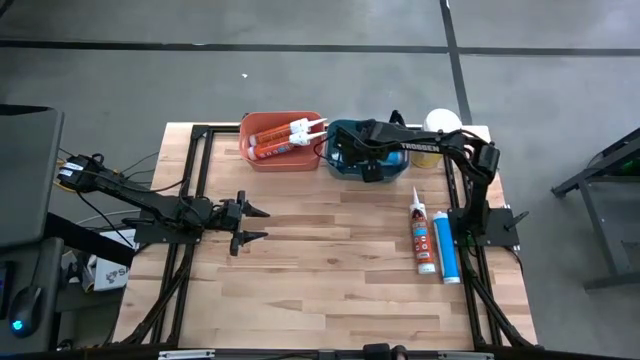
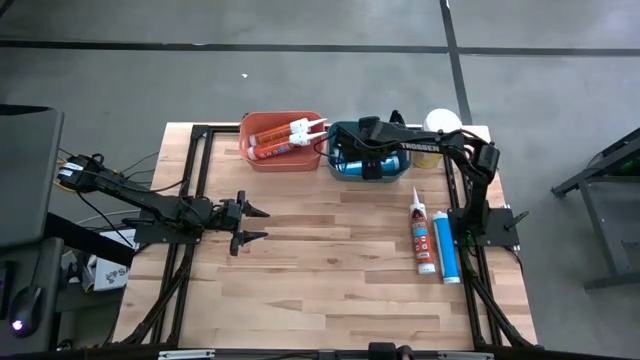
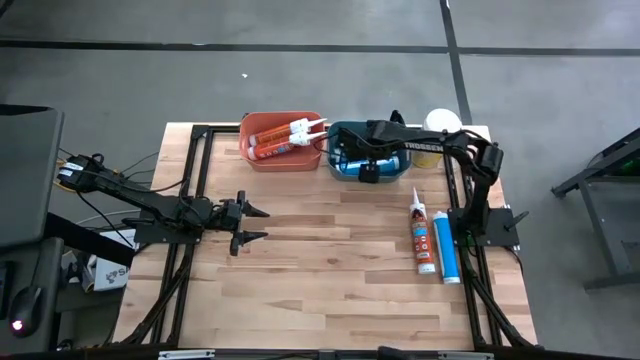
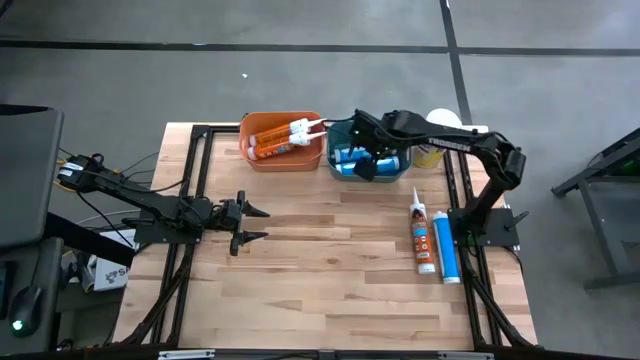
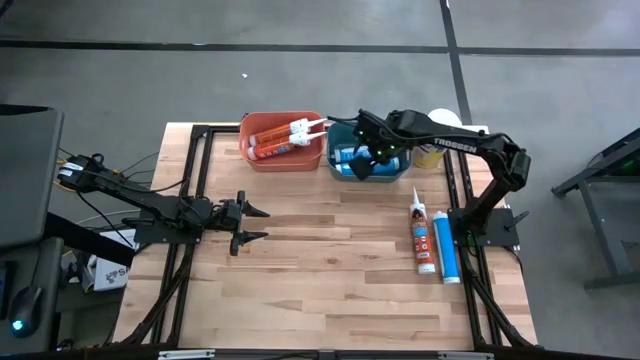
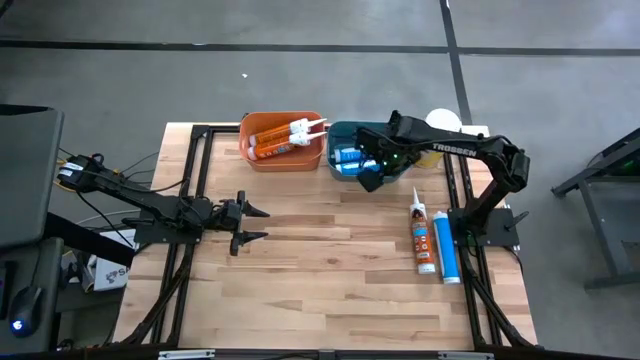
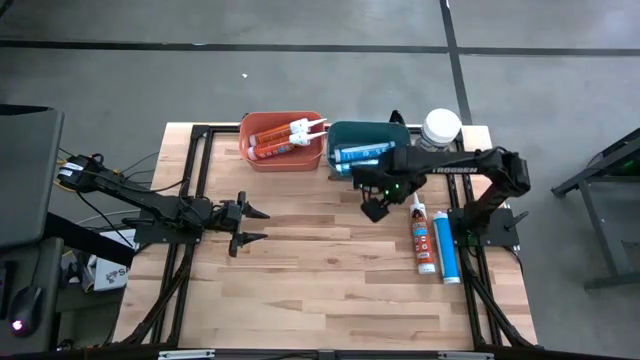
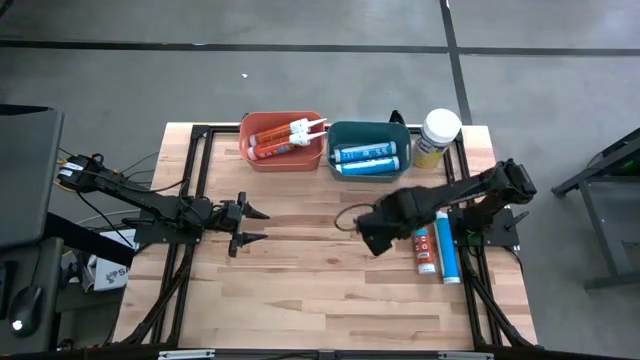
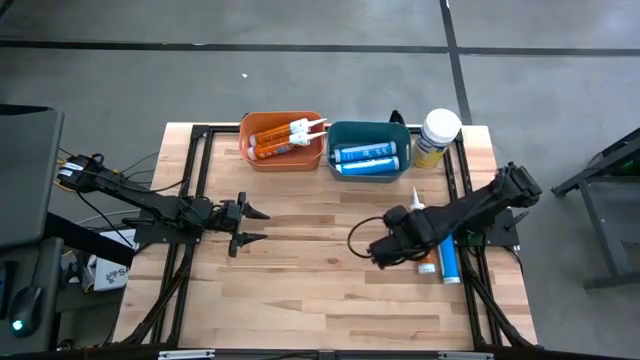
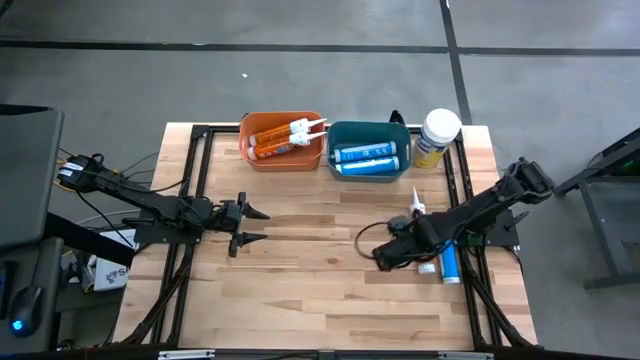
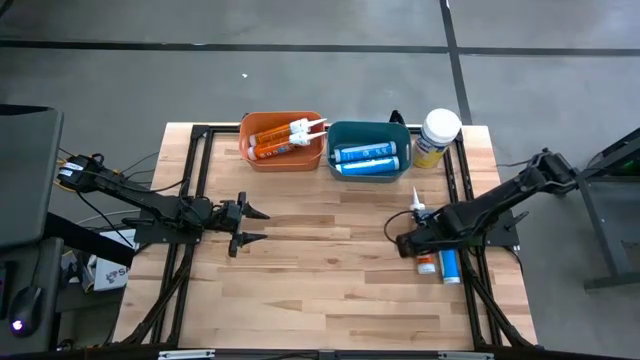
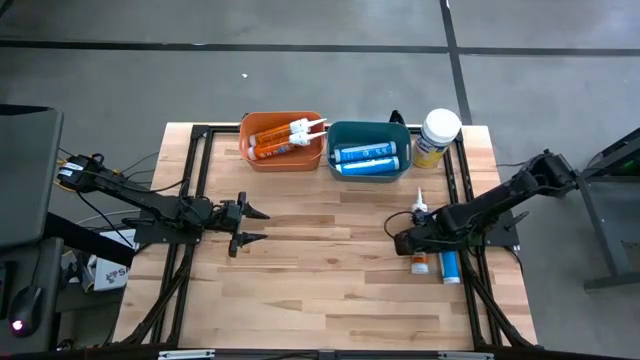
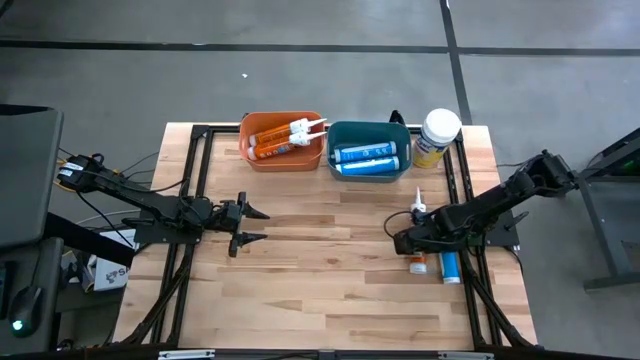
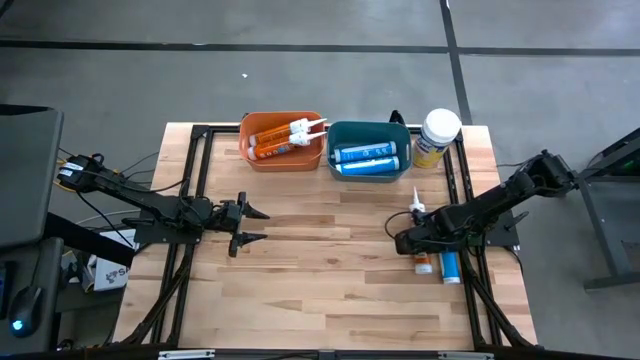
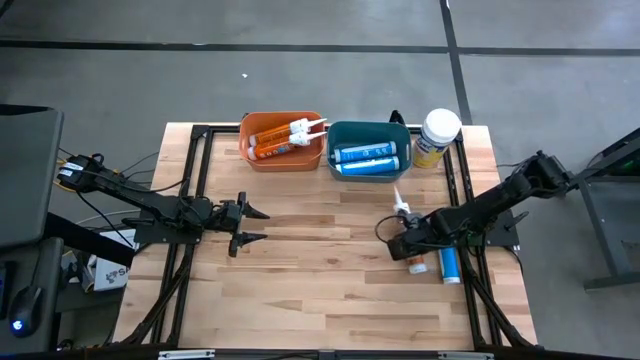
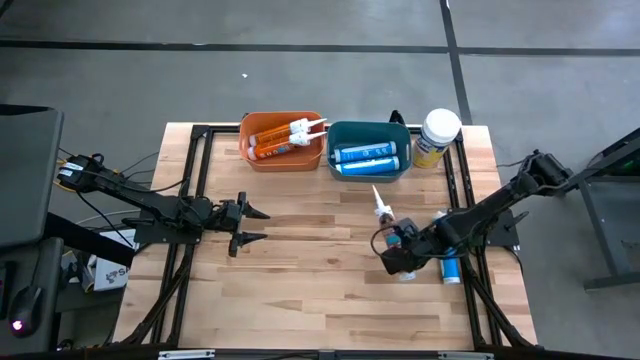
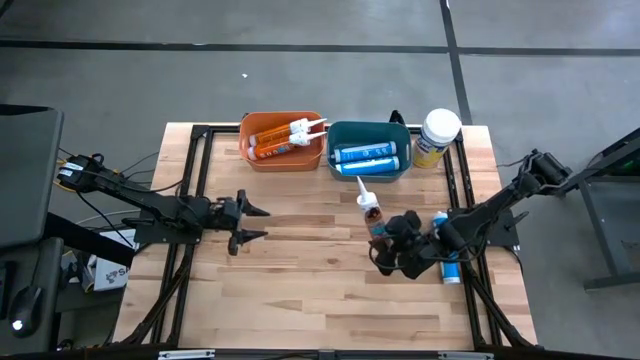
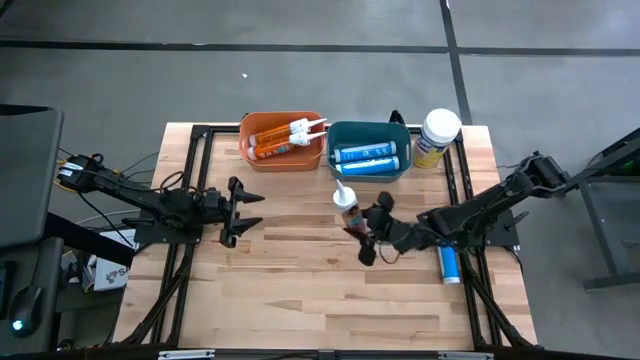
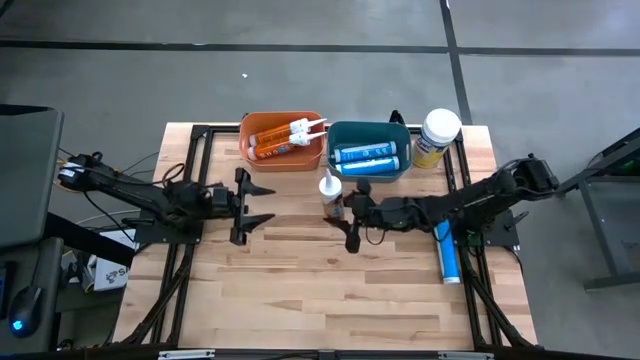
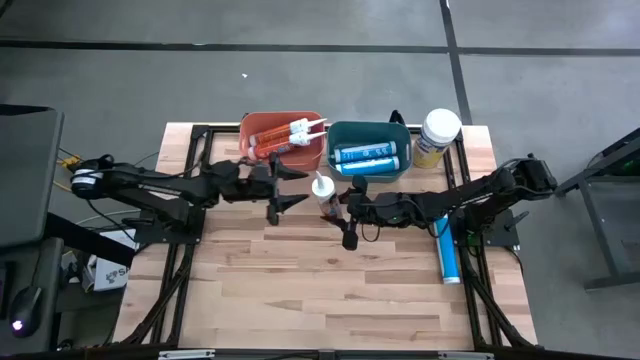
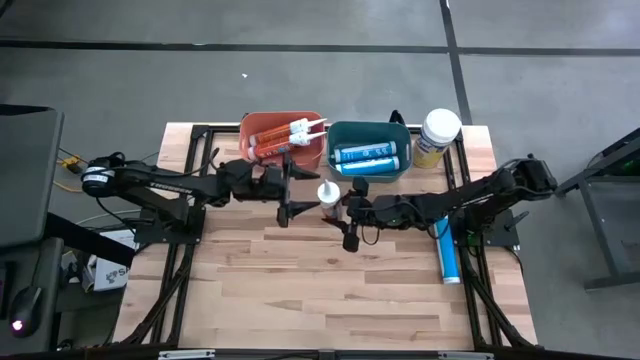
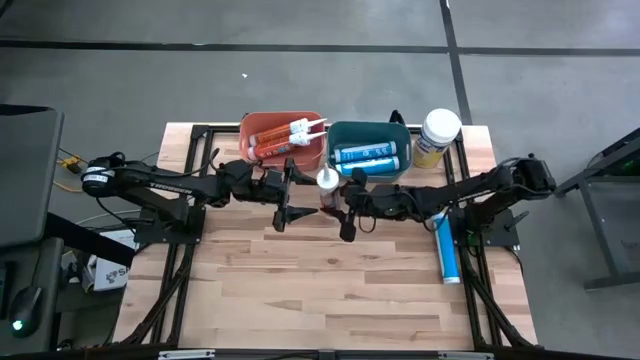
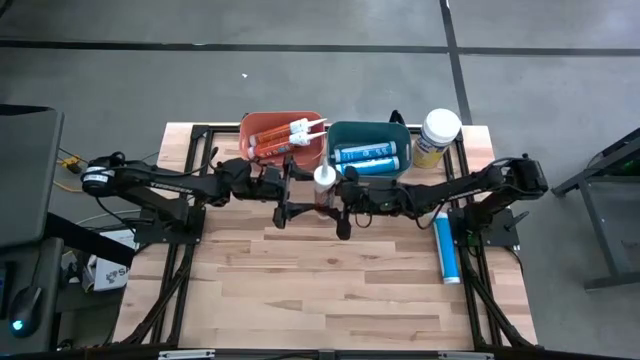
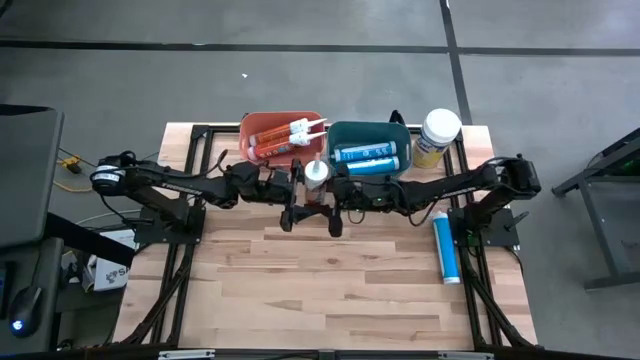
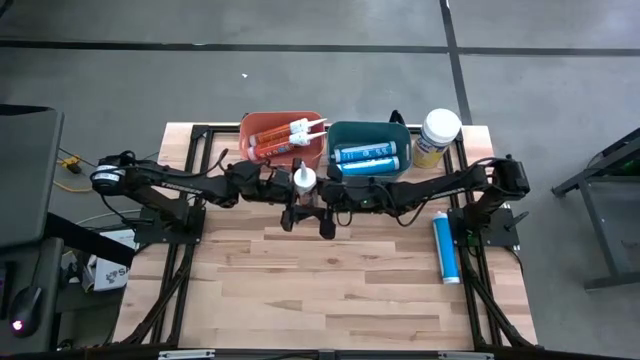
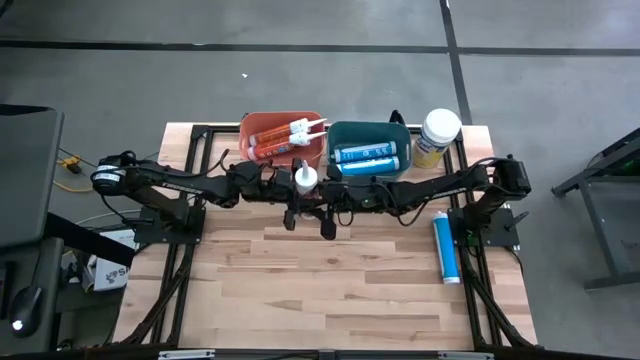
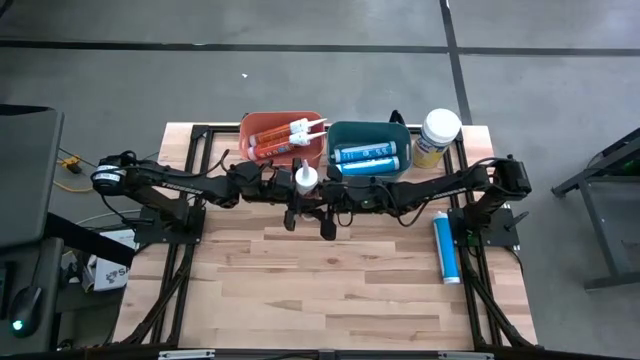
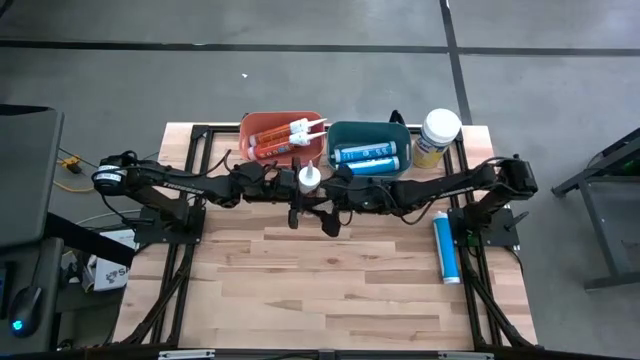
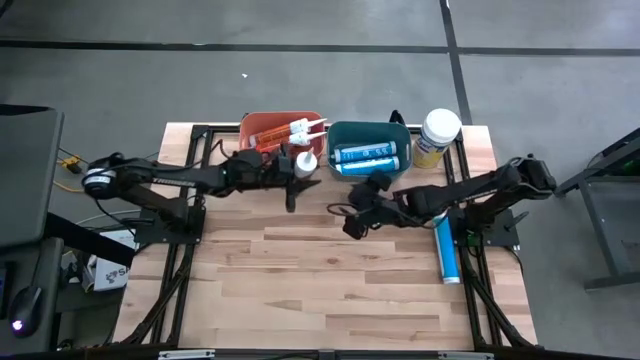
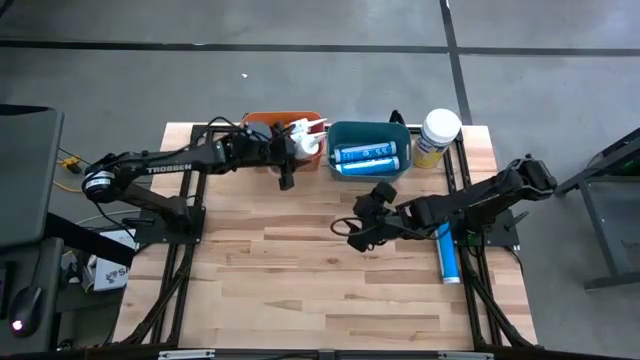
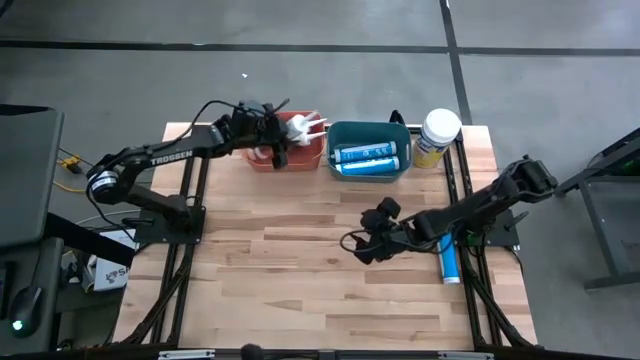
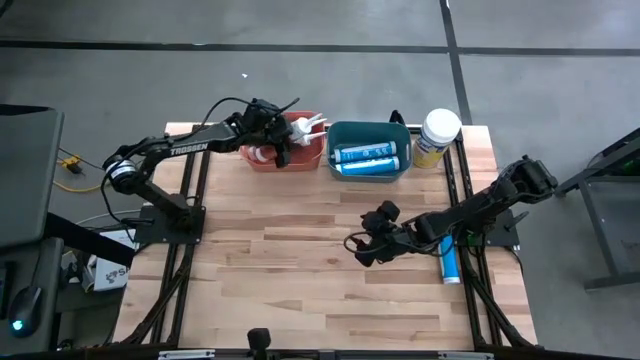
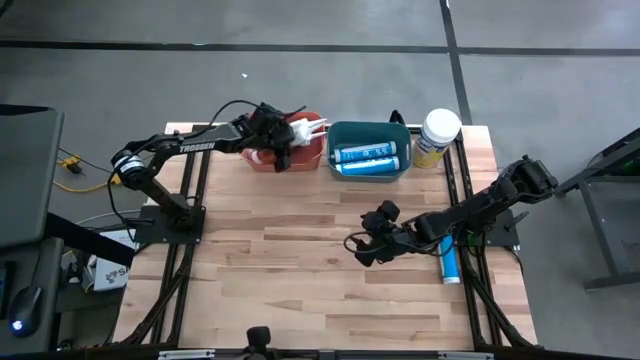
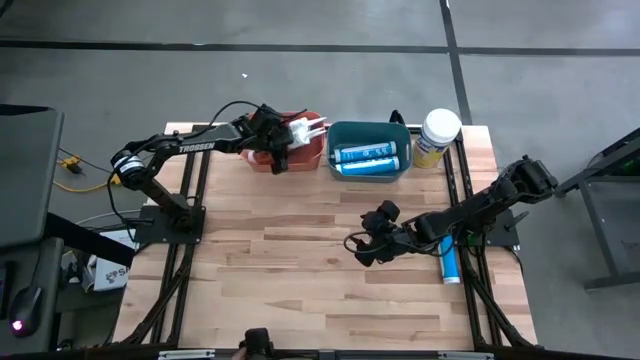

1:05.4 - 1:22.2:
Task: Pick & place silicon tubes, Sealant and Lysol wipes
Put the orange sealant into the orange bin

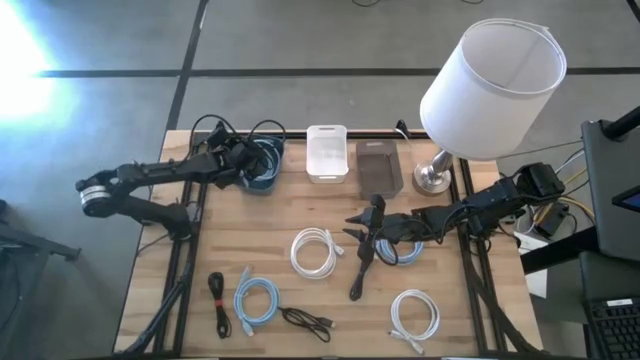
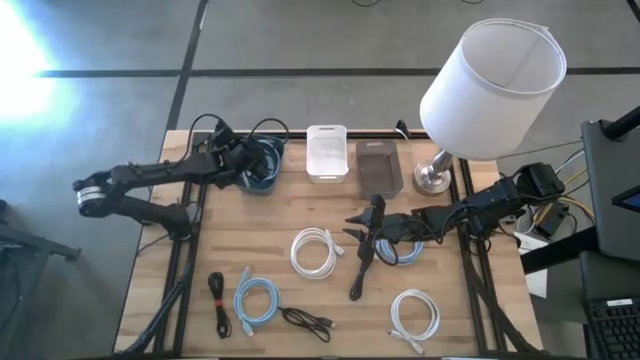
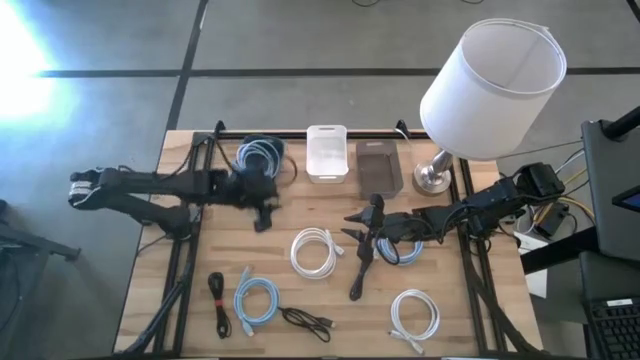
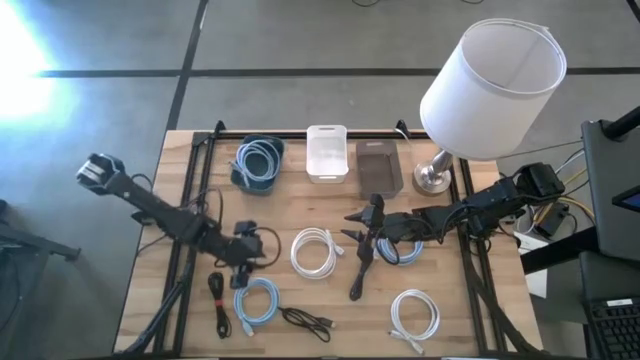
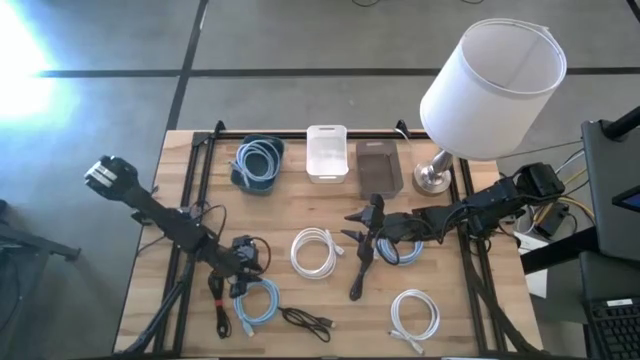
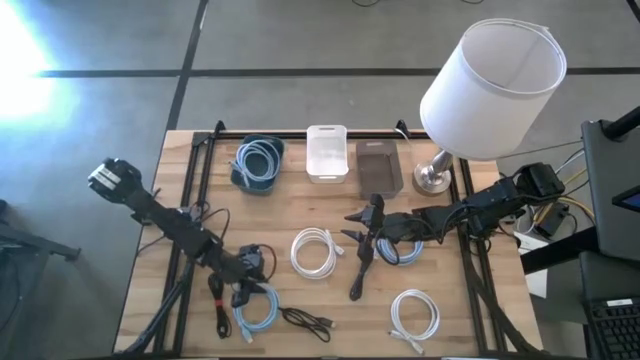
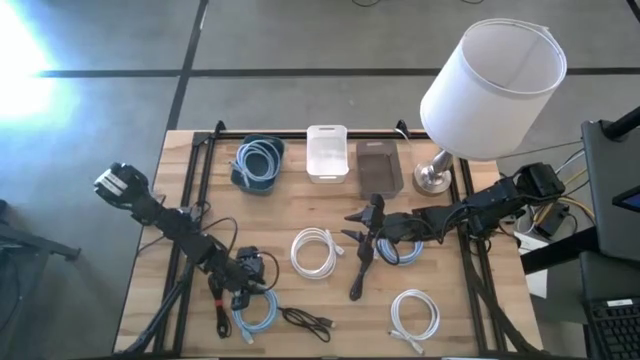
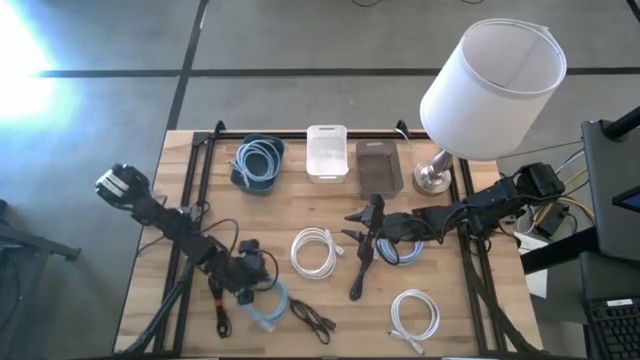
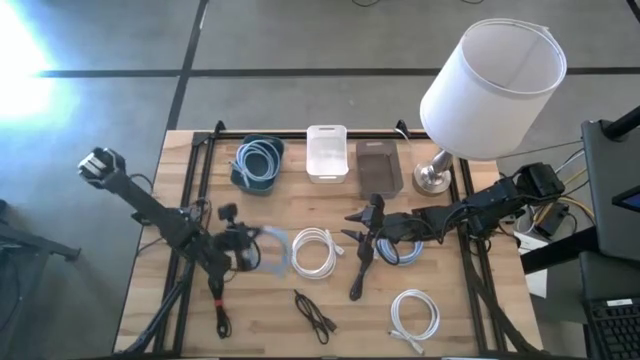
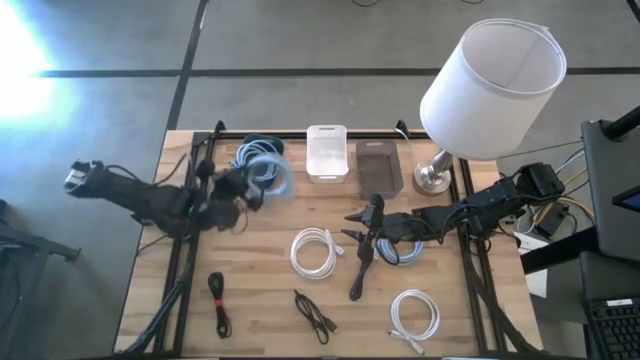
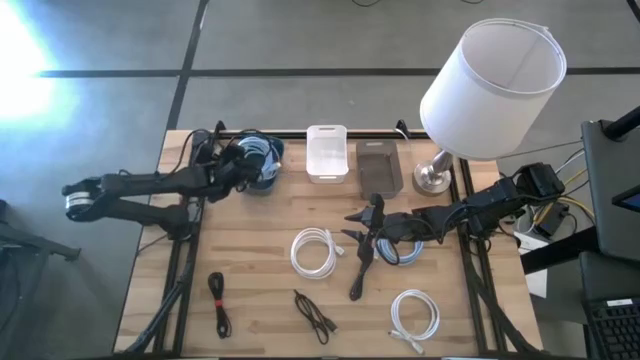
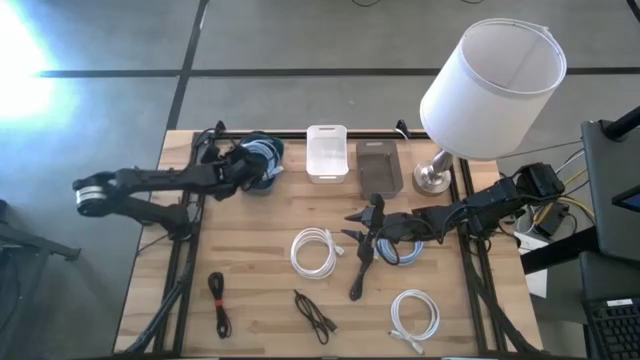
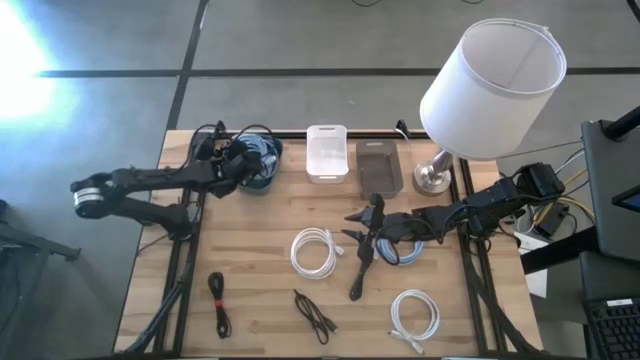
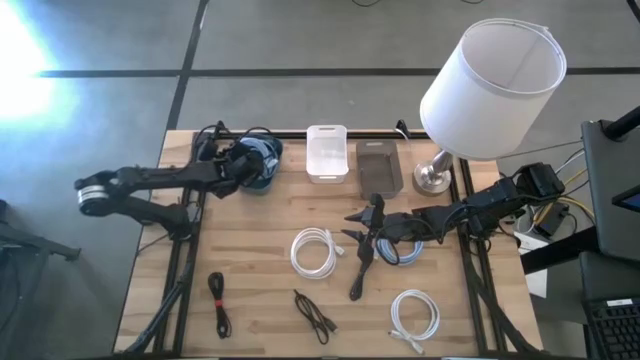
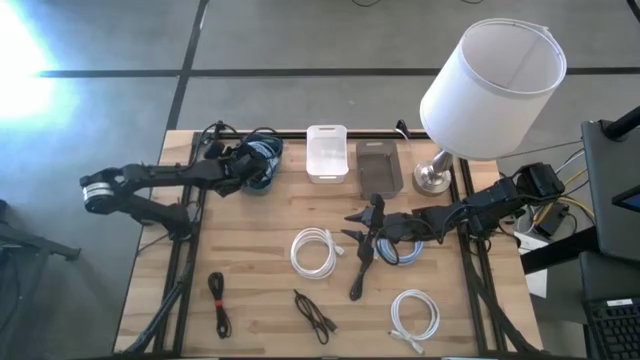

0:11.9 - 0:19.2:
Task: Pick & Place USB Port
Put the bottom blue HDMI cable into the blue bin
